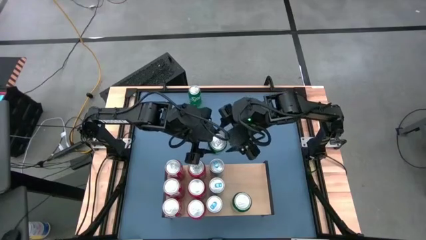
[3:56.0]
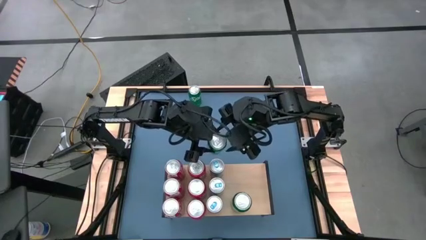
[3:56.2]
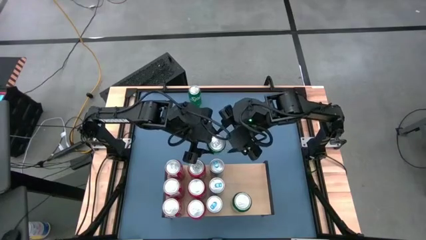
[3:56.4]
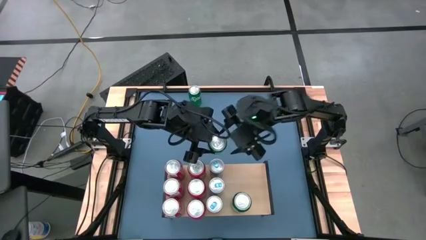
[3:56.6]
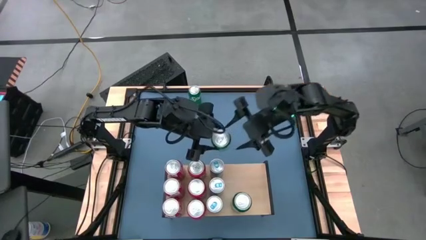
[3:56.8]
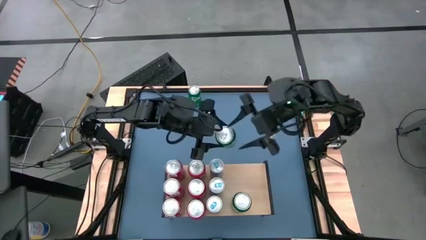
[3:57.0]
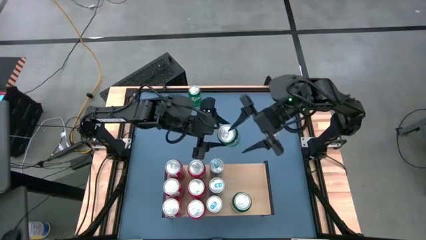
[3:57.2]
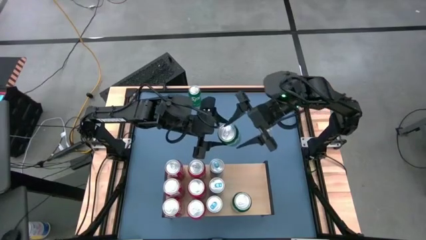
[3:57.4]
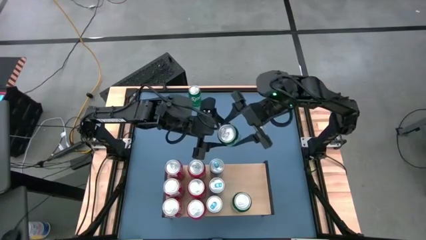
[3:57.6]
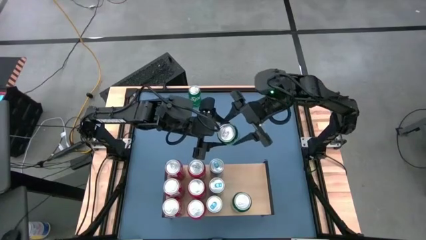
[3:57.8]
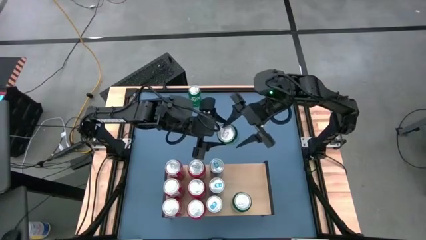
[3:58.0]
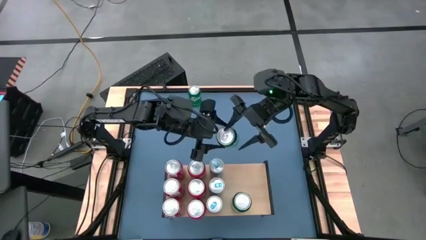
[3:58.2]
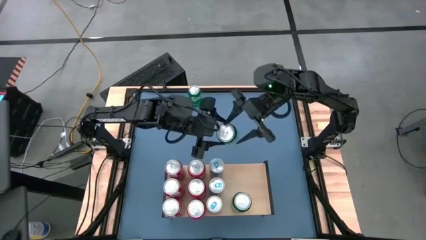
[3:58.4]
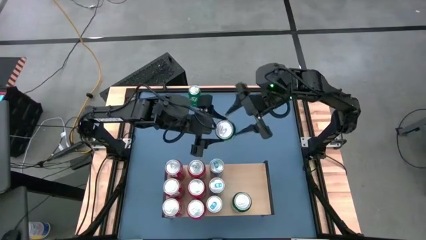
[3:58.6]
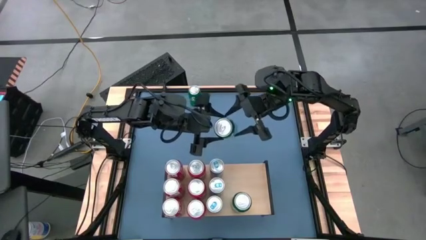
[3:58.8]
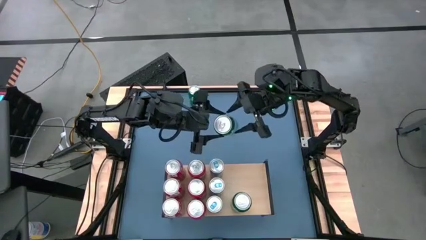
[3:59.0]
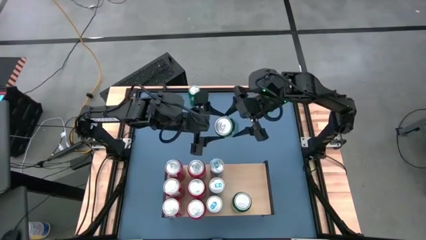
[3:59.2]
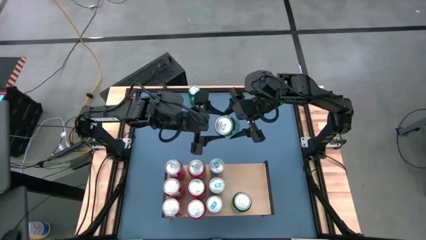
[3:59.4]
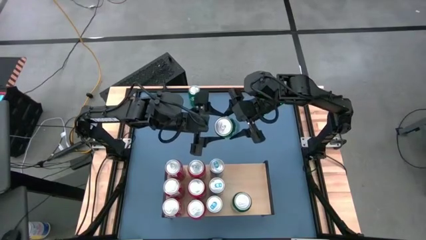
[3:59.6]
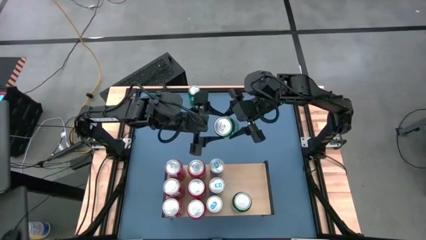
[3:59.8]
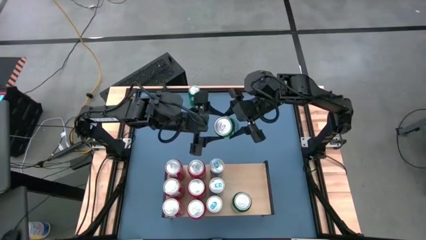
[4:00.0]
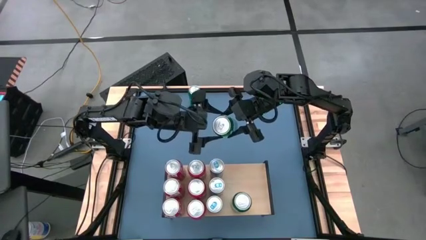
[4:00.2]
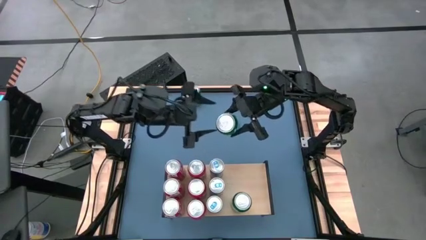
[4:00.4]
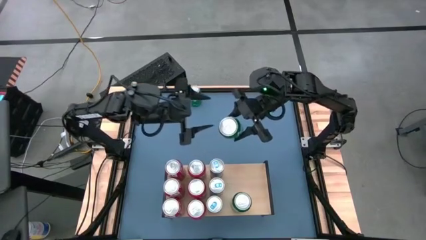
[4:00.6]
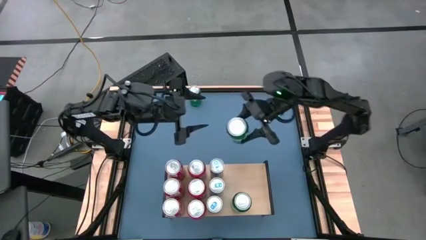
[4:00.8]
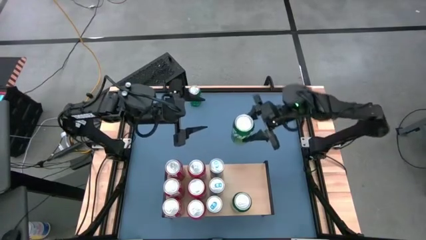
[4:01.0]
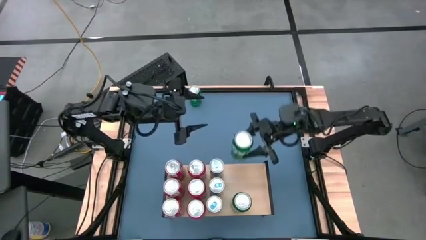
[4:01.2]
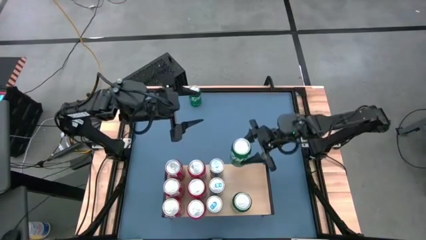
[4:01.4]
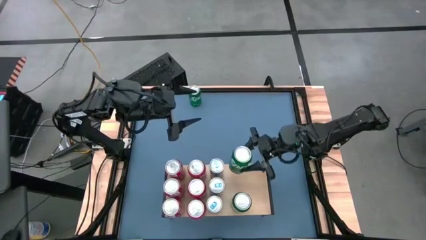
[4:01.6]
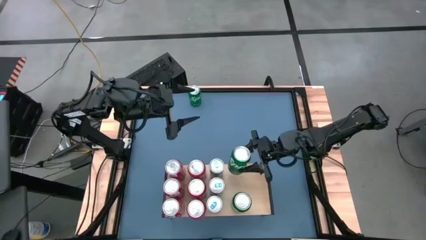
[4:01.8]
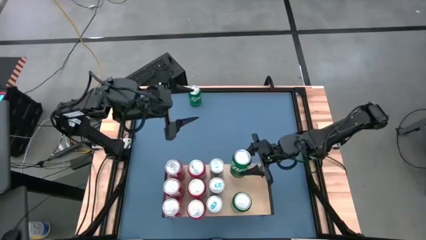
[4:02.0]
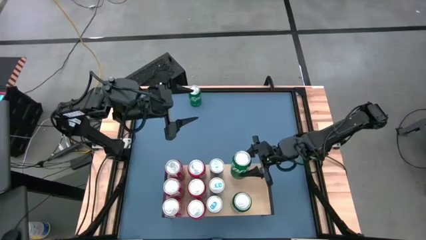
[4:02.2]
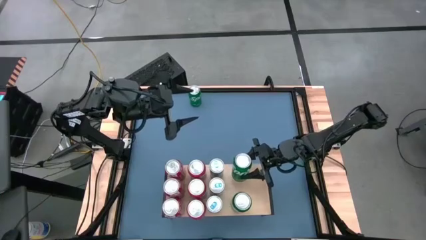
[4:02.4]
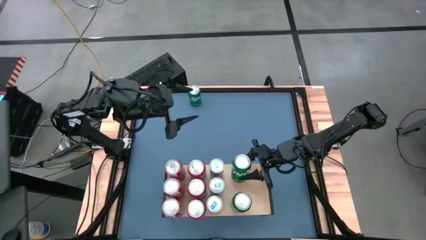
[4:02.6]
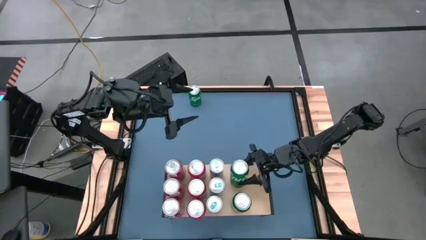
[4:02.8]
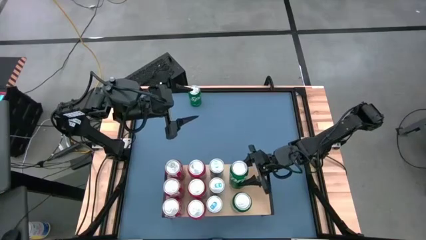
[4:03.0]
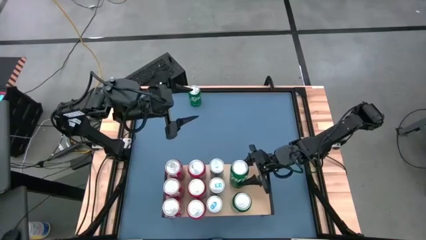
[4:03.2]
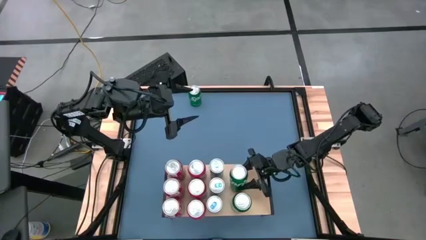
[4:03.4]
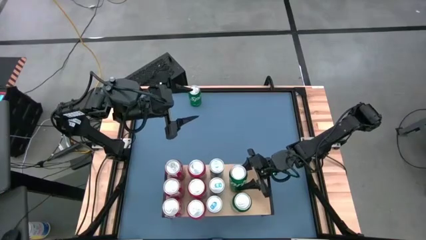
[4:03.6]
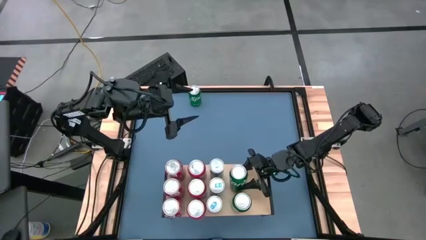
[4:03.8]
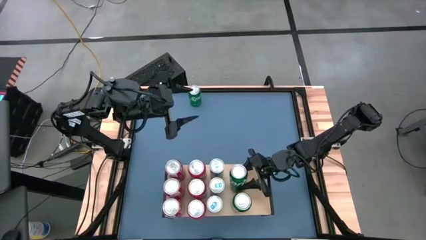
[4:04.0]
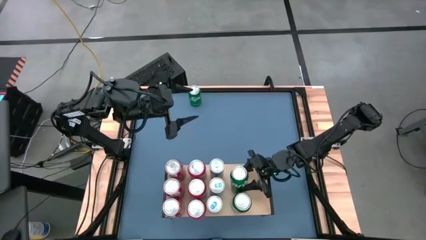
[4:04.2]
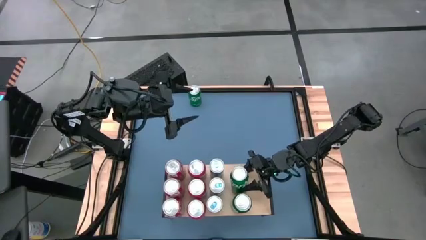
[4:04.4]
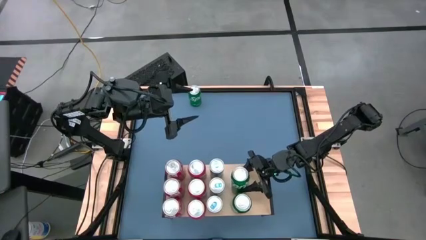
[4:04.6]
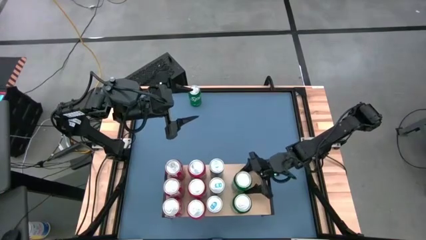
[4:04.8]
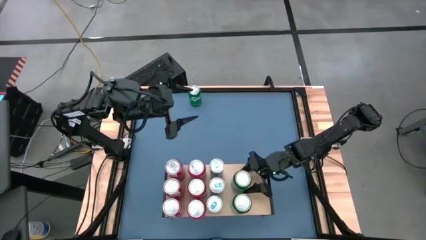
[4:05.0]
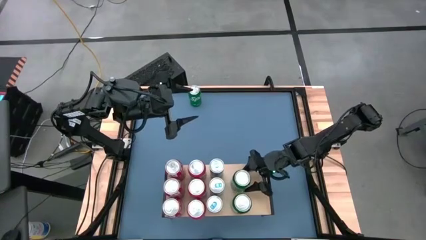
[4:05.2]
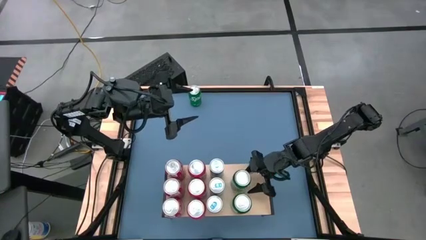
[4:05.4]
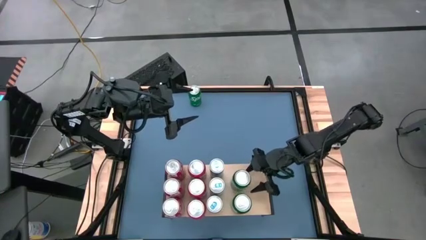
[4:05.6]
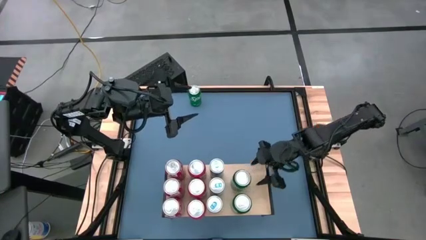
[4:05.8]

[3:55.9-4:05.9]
Task: Place canned beverage on shelf
Put the bottom green soda can on the shelf aligned with the other green soda can
